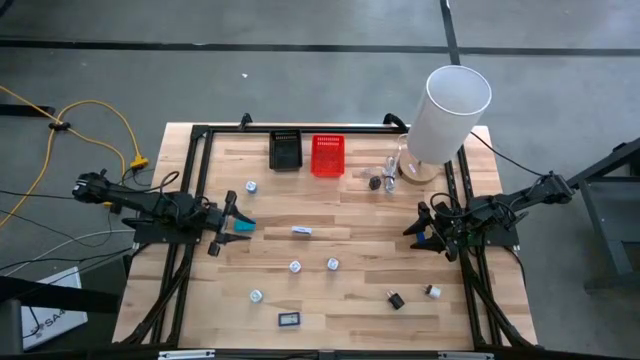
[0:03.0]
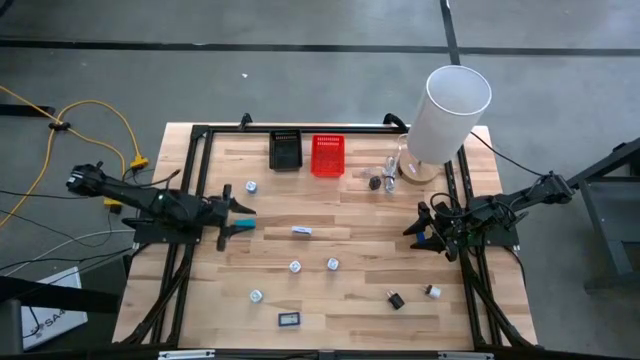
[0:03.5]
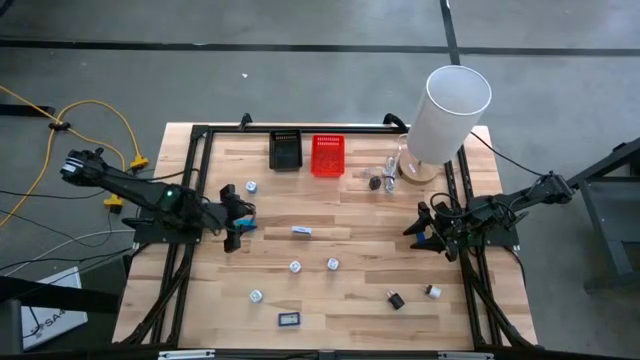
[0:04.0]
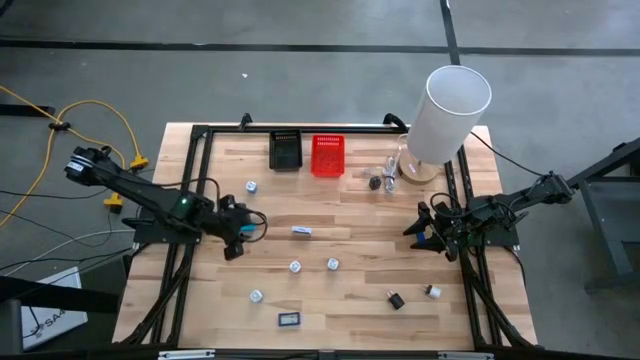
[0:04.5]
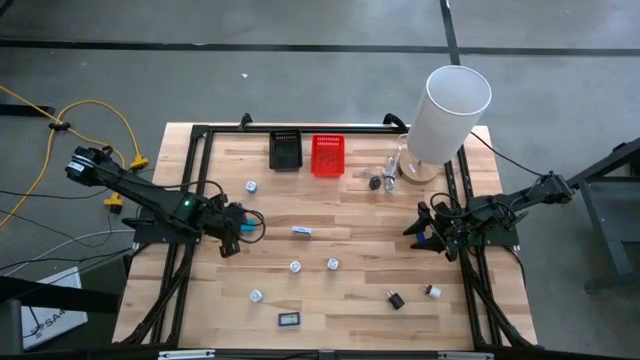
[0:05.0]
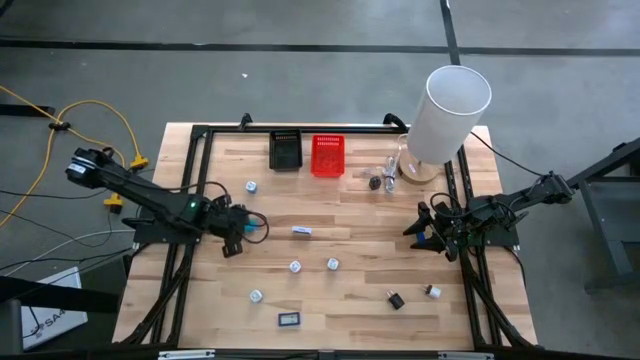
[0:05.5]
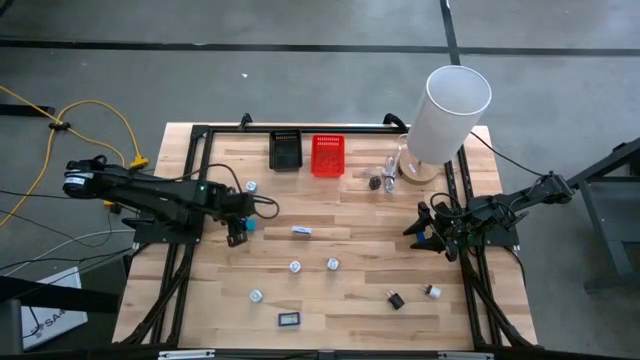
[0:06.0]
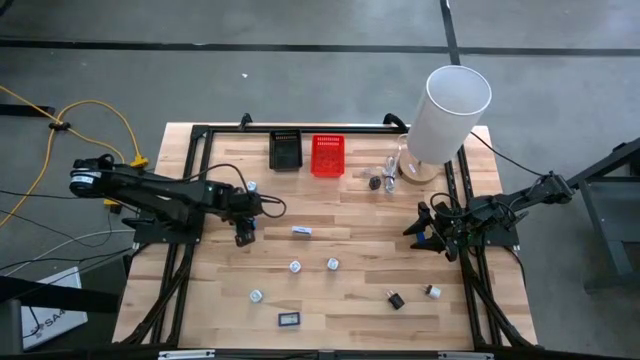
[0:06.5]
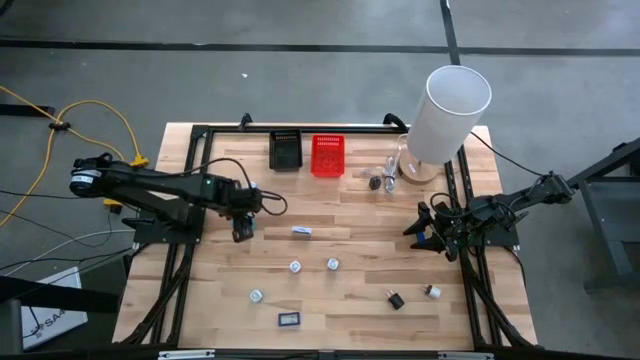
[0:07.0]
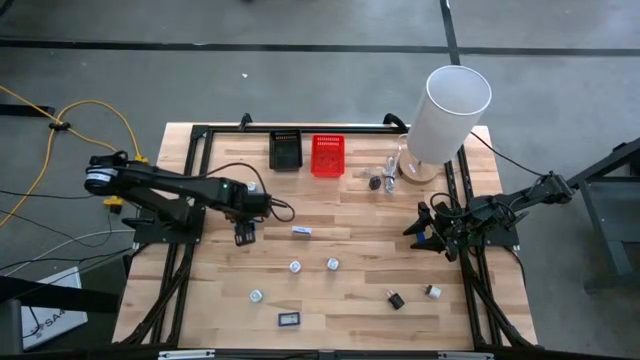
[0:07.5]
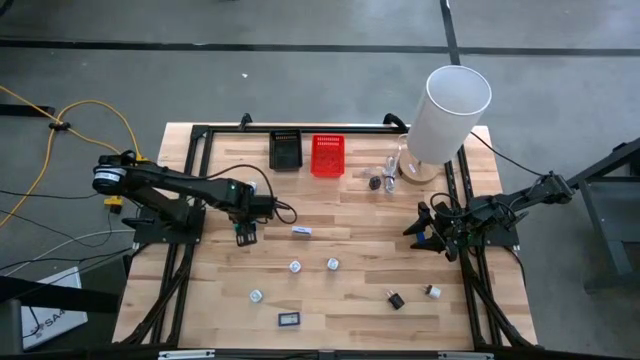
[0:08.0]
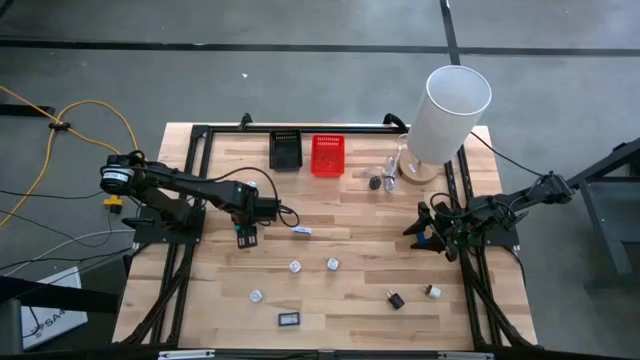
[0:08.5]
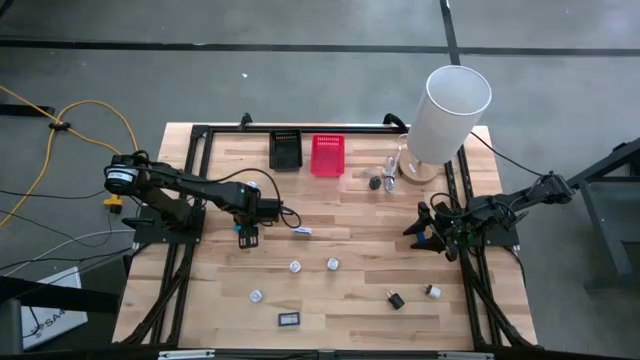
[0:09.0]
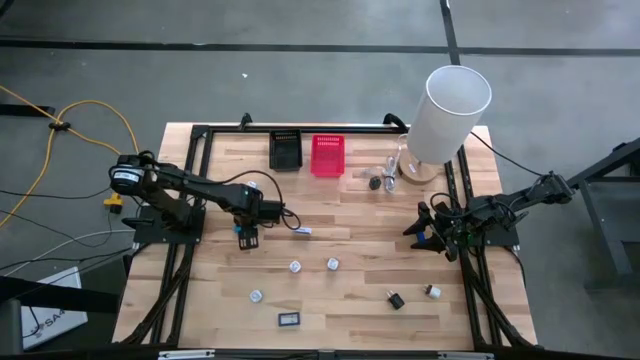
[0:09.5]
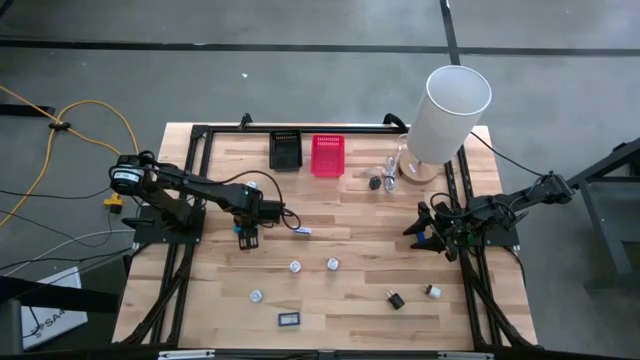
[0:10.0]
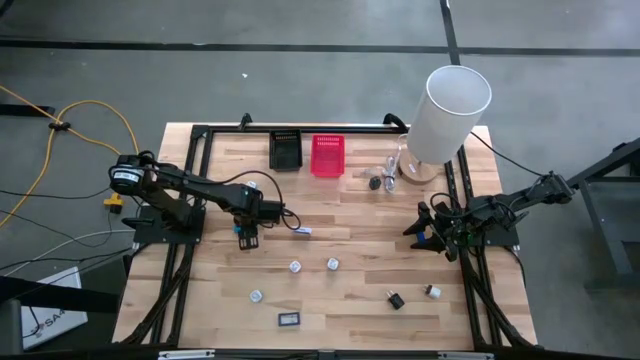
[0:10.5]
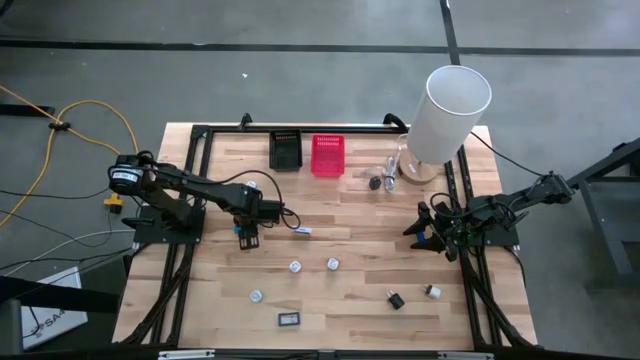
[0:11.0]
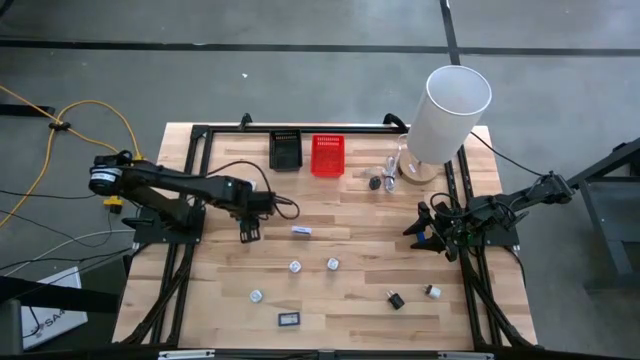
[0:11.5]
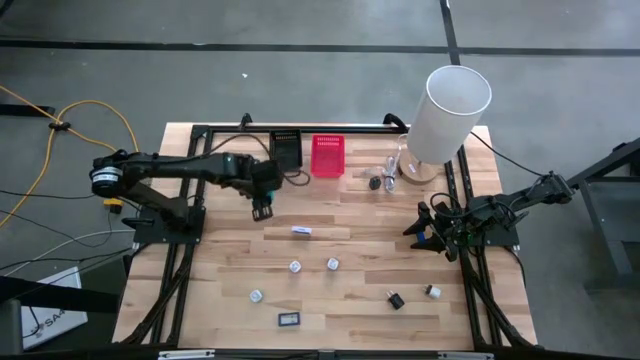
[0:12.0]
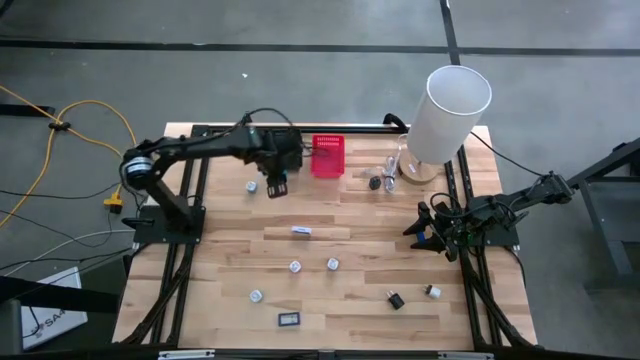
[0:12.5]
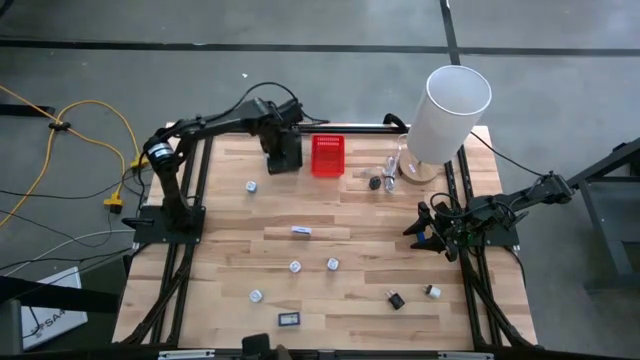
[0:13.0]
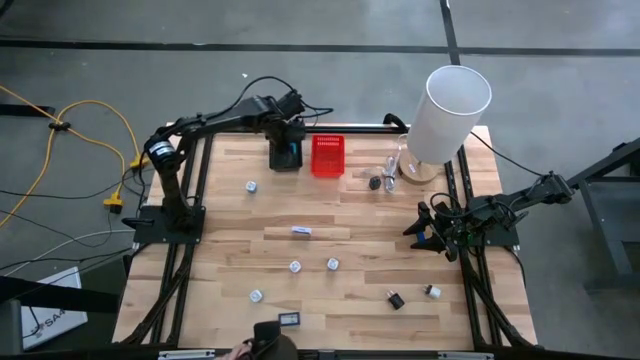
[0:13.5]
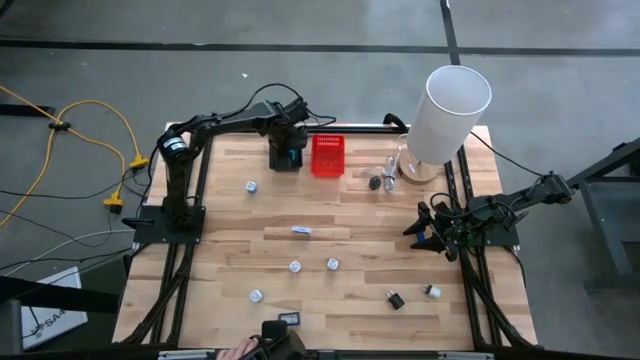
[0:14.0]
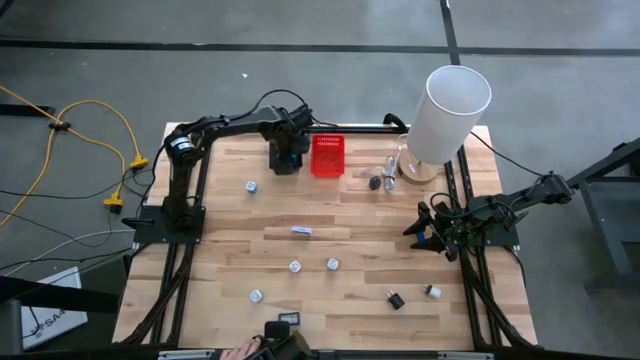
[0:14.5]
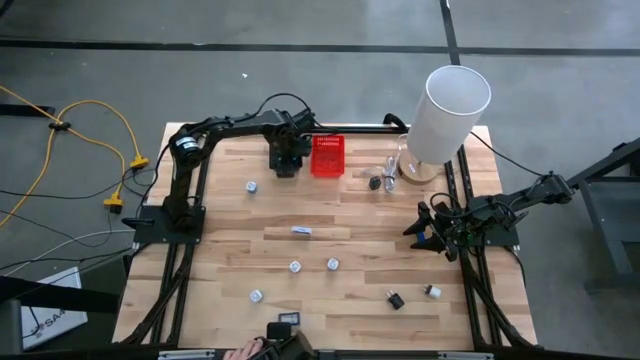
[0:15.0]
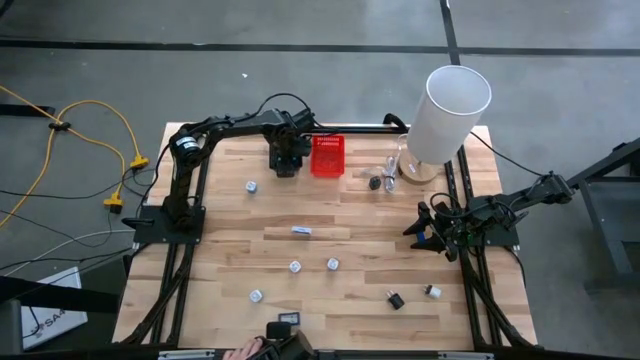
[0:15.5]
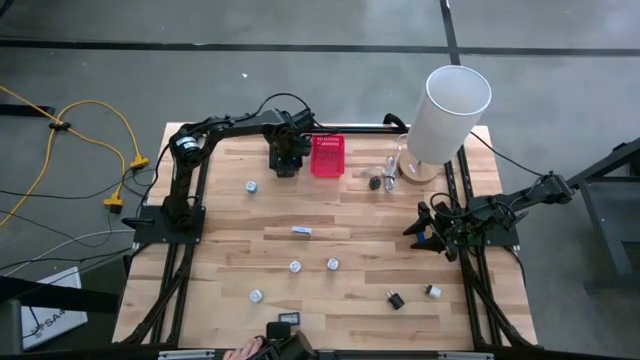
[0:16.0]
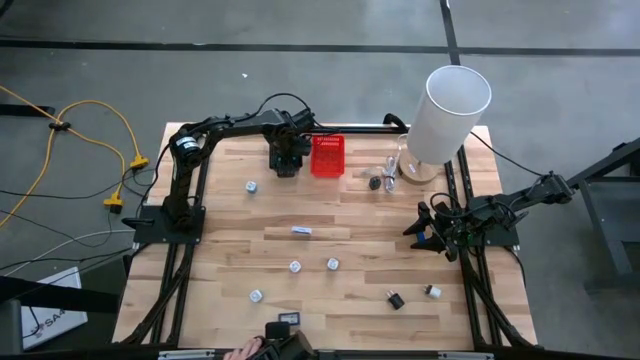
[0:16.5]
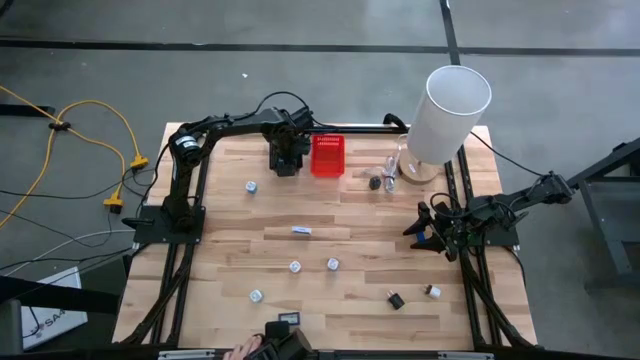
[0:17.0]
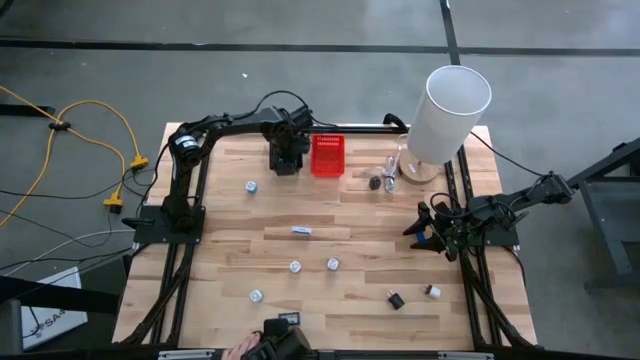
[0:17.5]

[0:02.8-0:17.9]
Task: Pick & Place Office items
Put the light blue digital timer into the black basket
